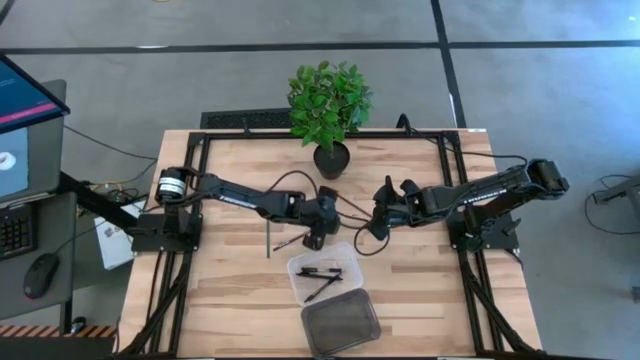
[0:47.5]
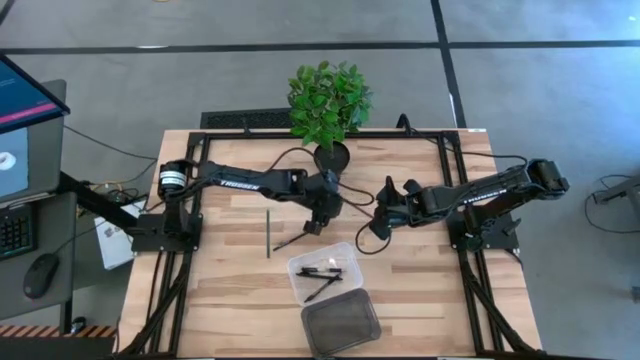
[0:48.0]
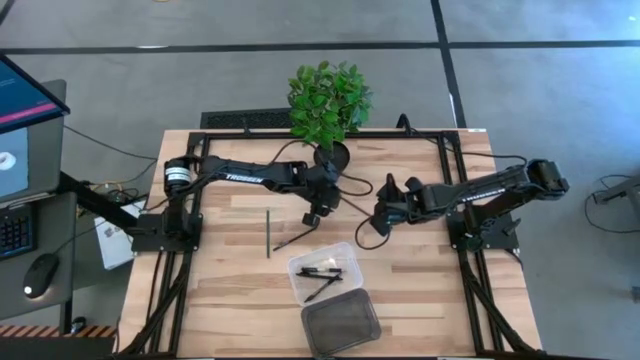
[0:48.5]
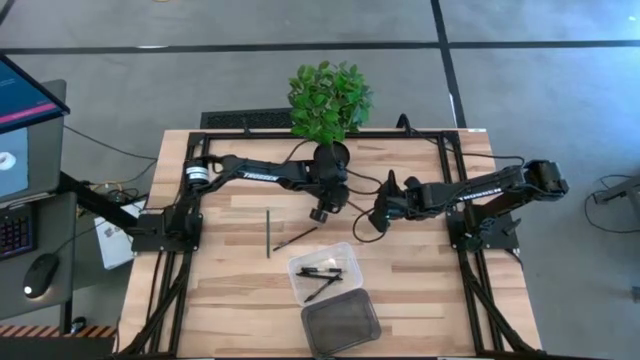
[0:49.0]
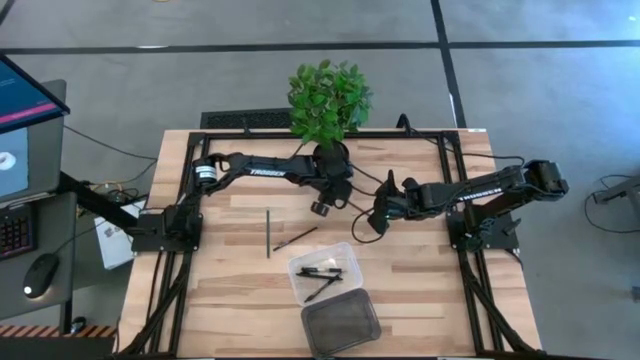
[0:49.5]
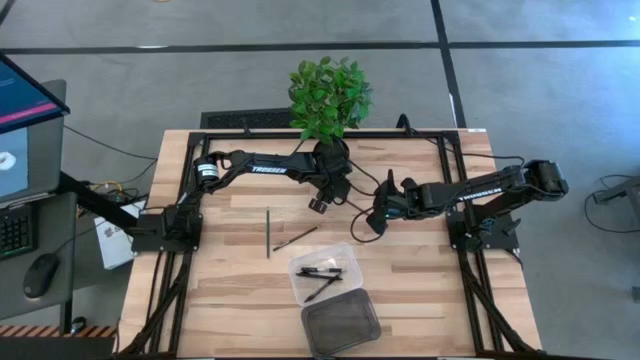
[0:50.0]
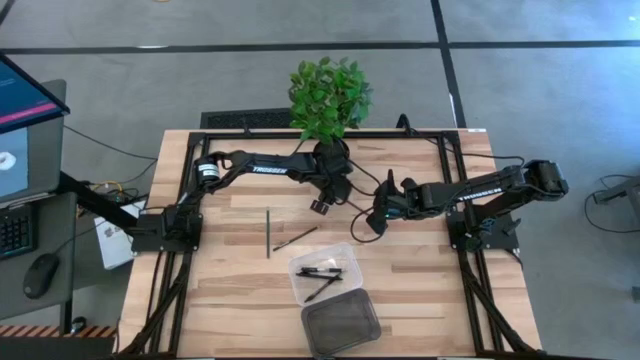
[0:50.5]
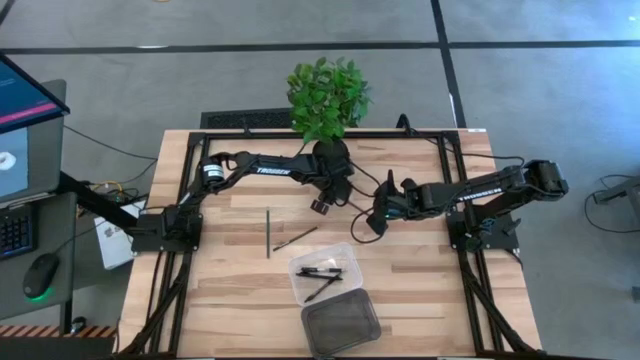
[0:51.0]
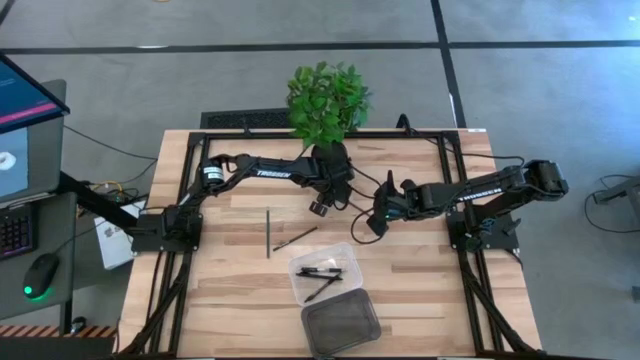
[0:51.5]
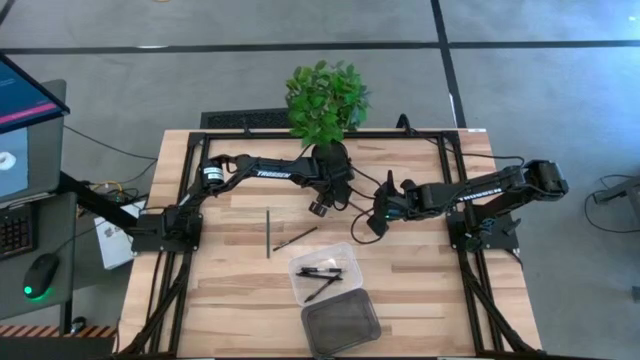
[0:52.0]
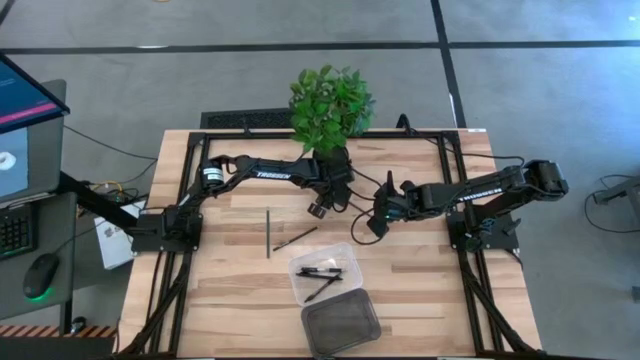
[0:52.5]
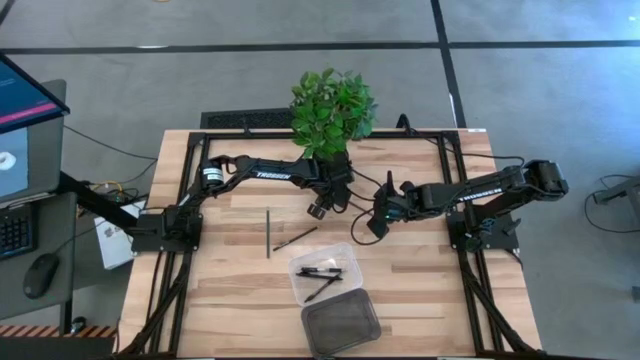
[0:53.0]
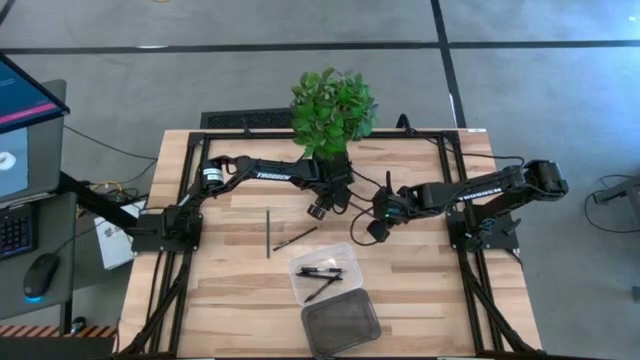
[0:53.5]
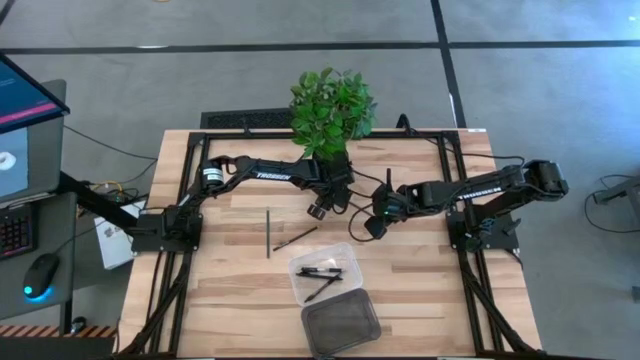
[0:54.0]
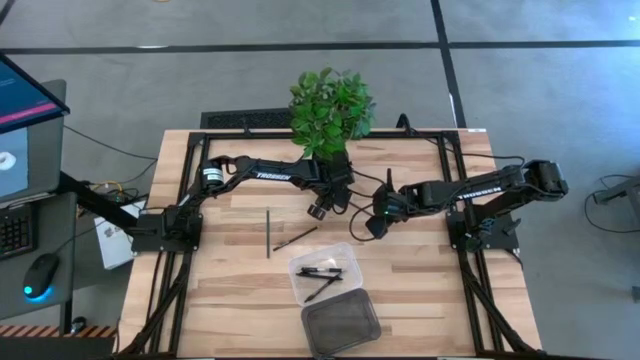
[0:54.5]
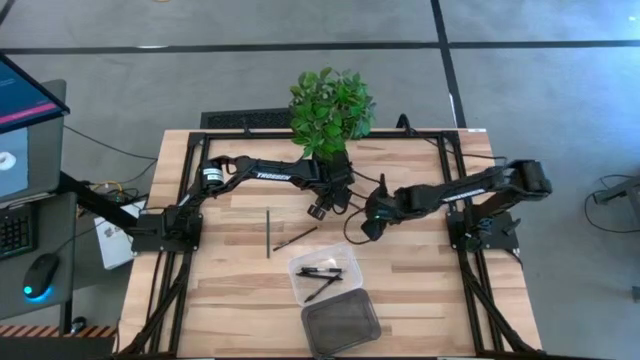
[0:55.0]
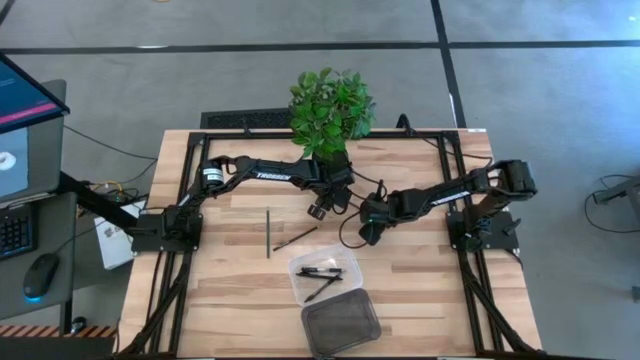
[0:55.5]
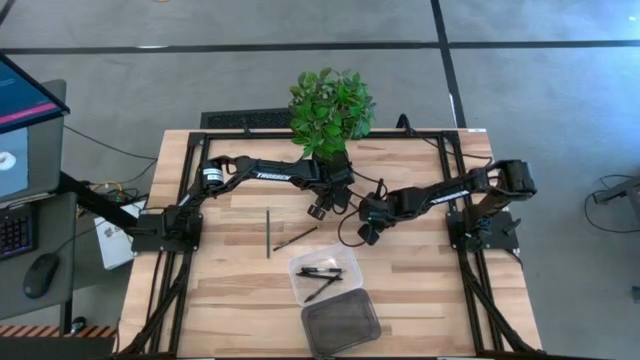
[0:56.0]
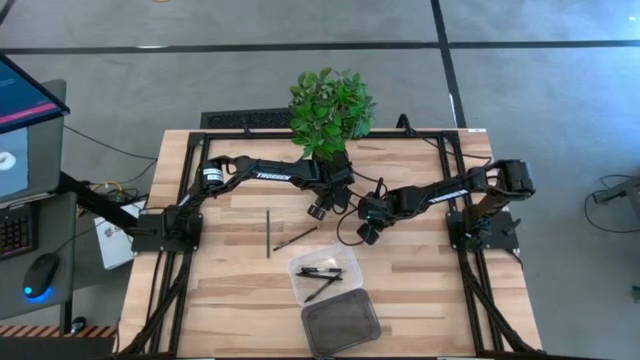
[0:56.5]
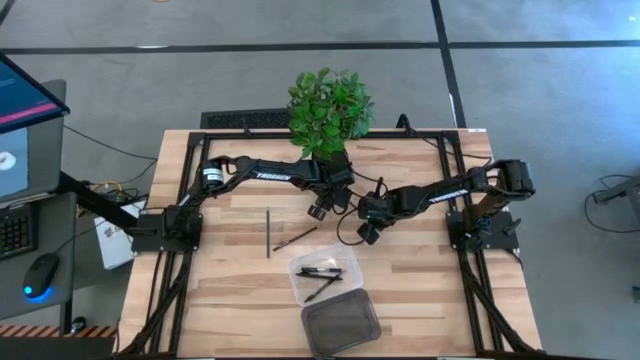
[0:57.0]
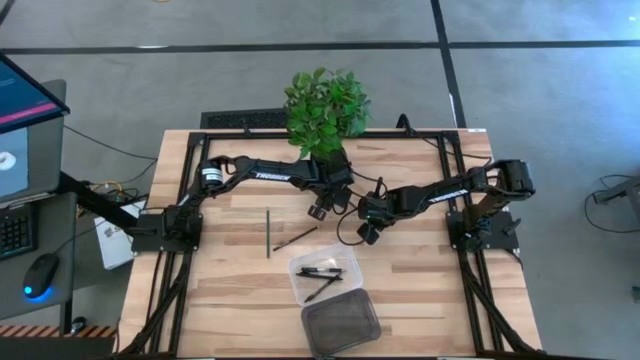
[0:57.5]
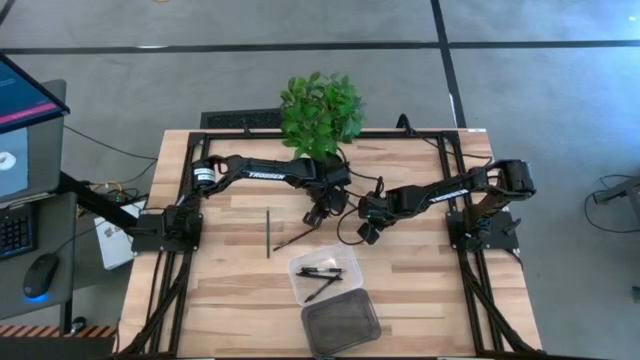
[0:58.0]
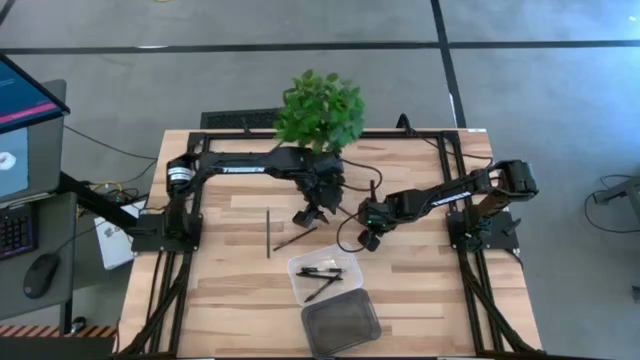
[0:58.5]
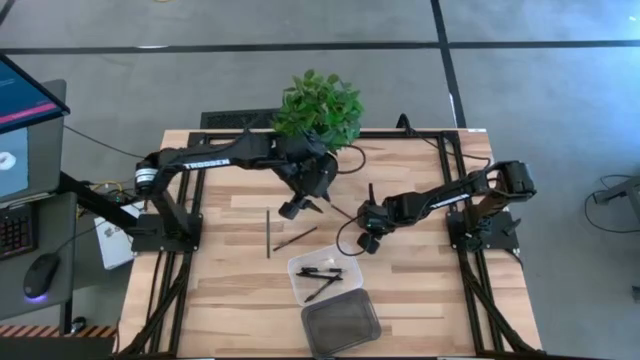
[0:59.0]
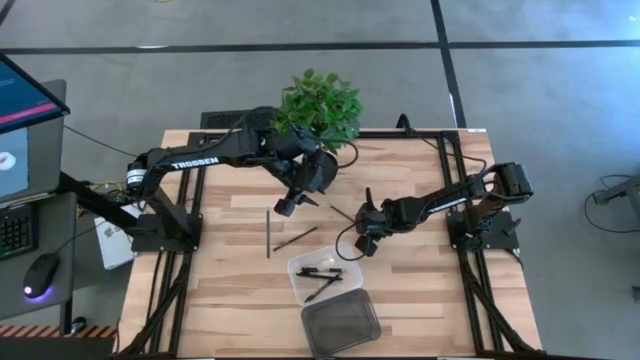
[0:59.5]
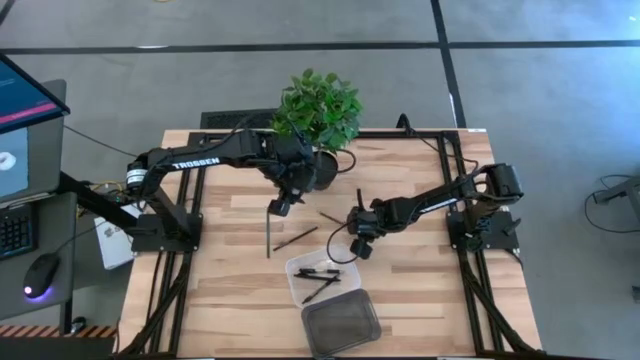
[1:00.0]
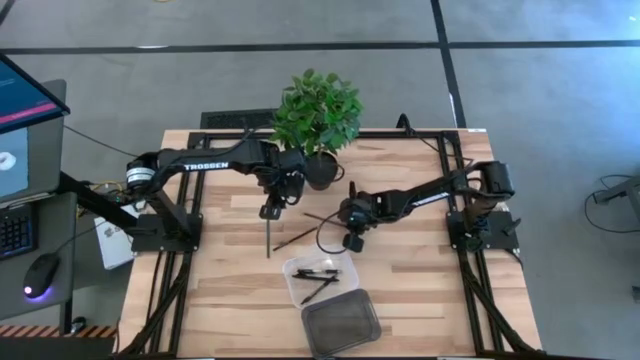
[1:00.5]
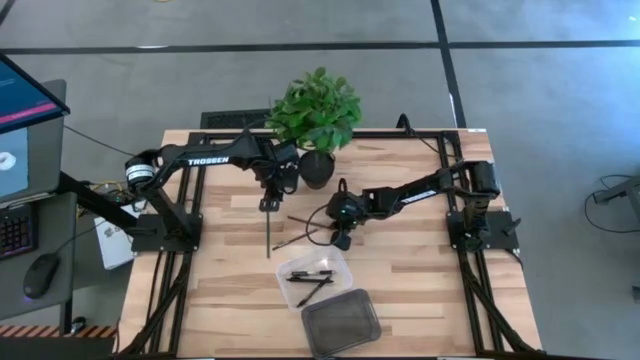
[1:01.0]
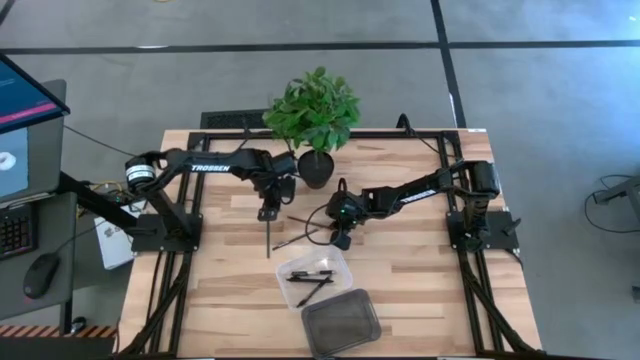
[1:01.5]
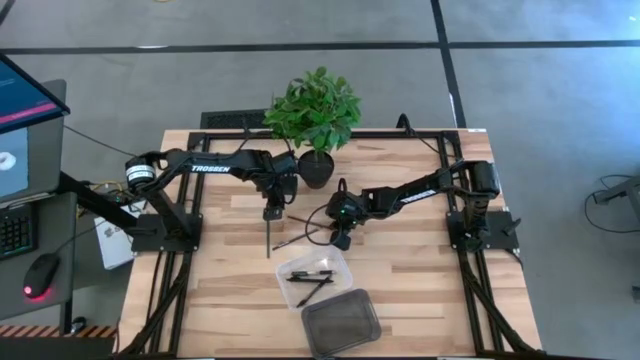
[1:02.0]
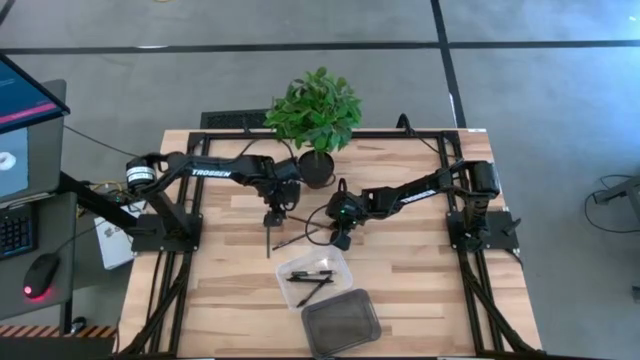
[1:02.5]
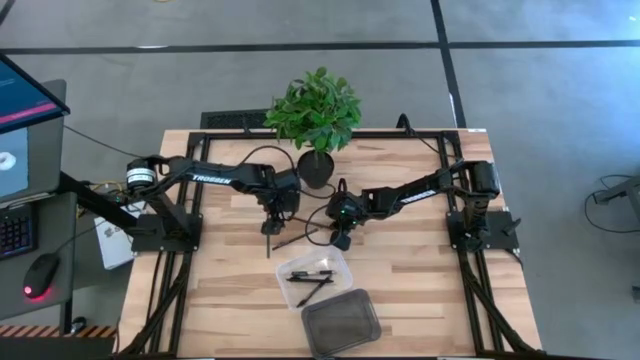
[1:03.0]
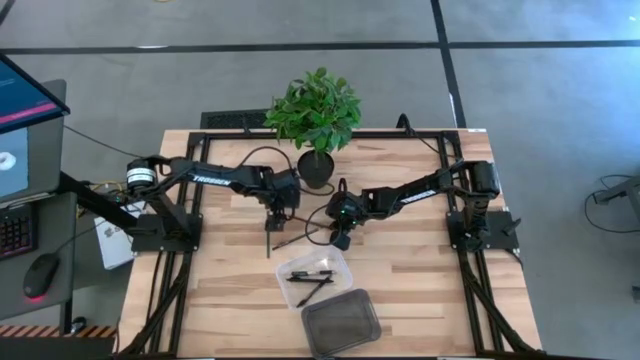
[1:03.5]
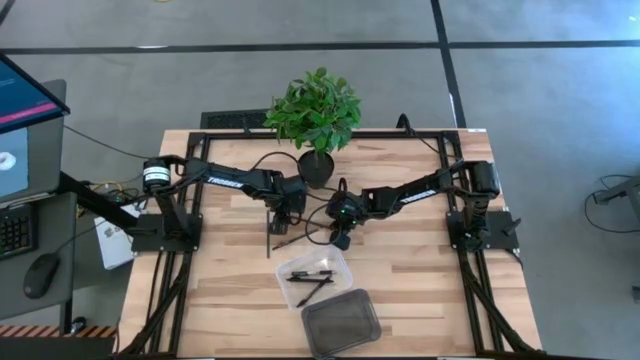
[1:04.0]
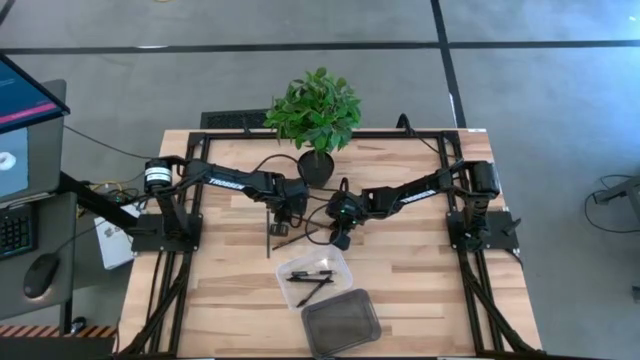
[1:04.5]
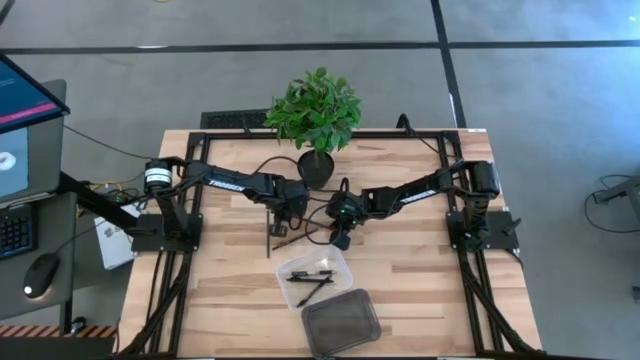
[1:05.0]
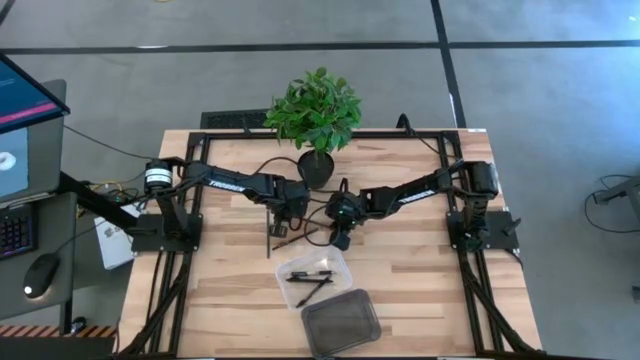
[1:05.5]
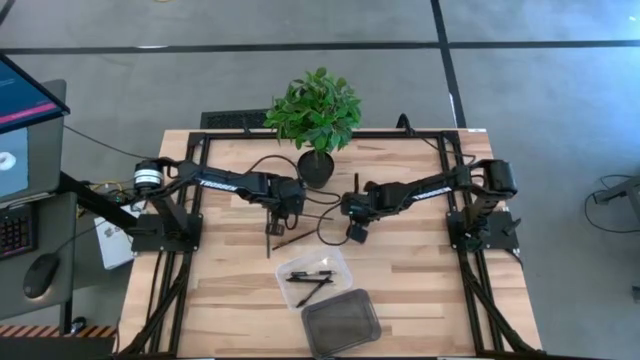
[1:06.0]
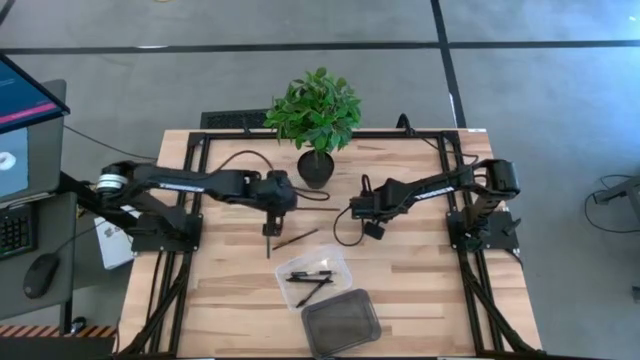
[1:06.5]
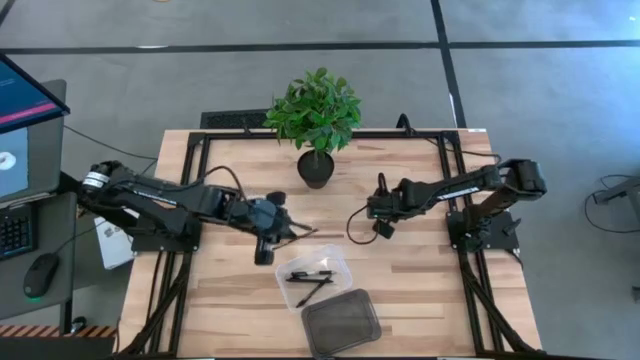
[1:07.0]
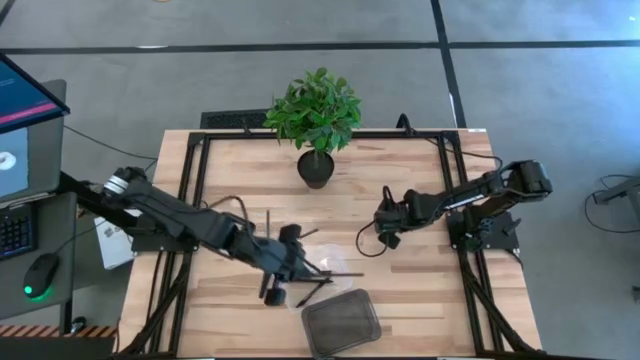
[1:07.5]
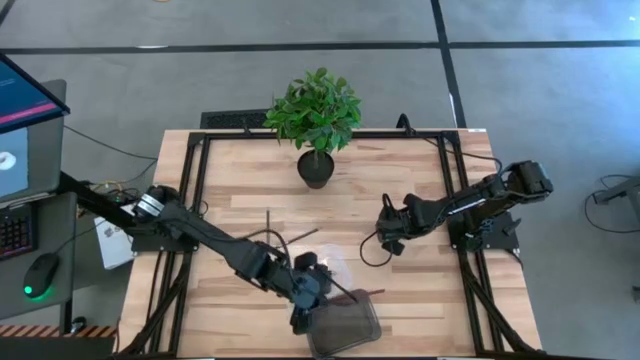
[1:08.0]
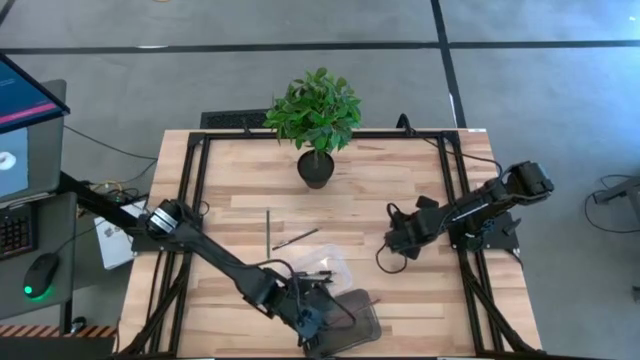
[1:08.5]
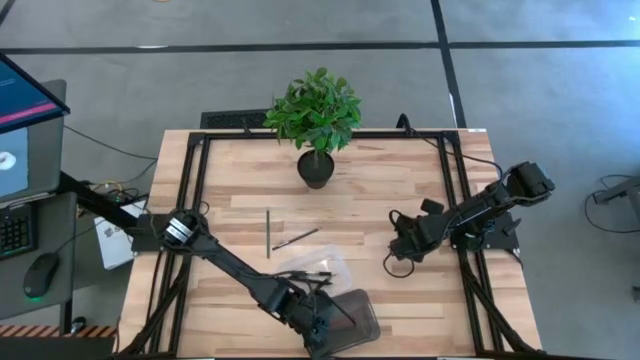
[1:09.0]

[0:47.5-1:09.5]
Task: Sort pens & pencils
Put the brown pencil into the black bin
